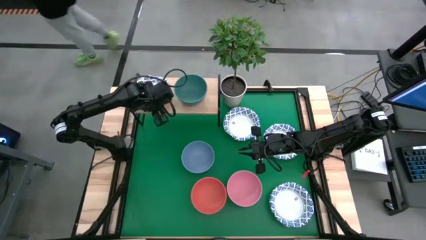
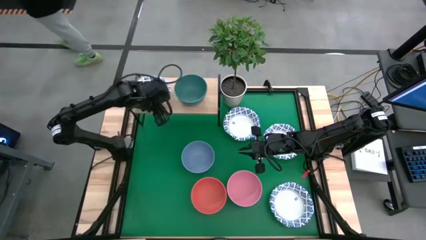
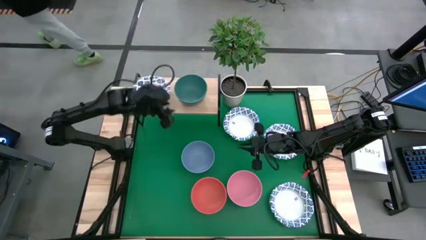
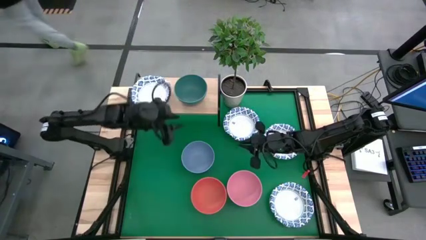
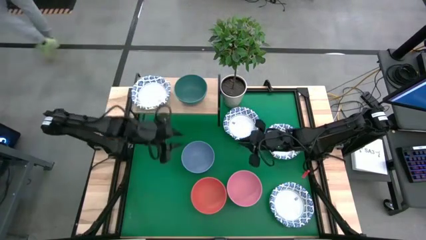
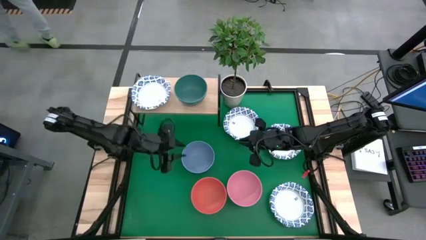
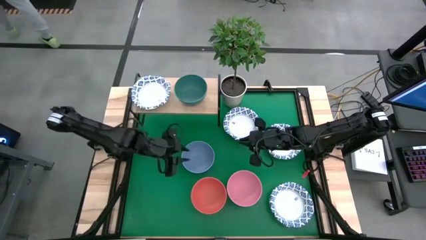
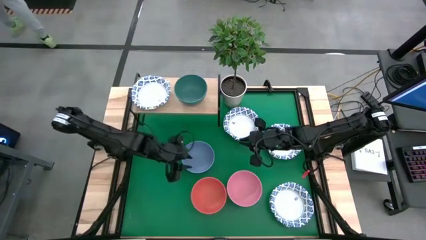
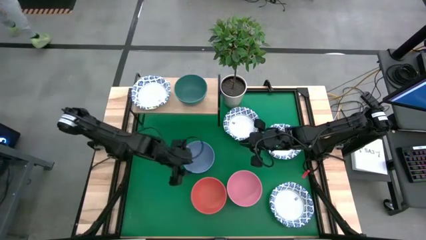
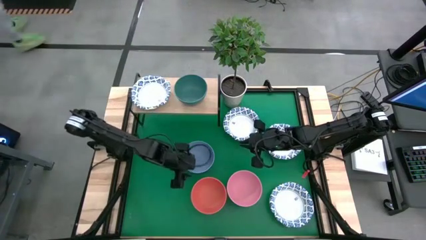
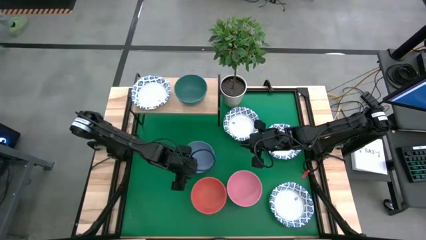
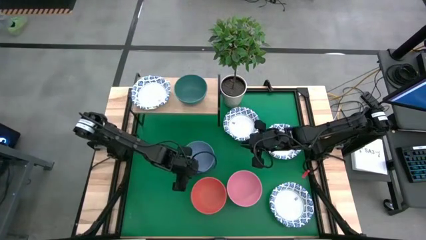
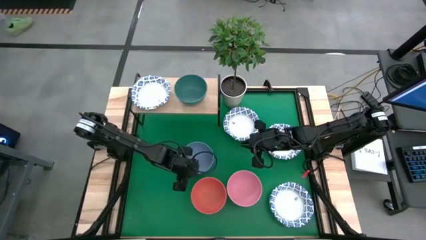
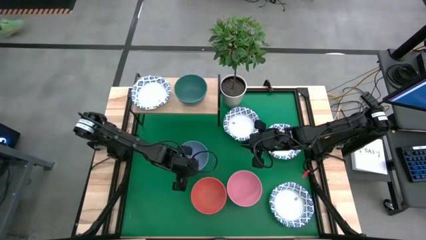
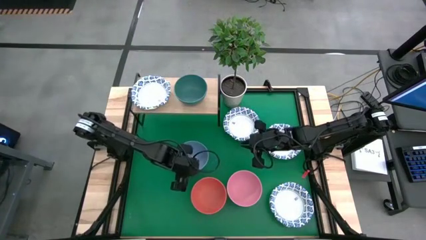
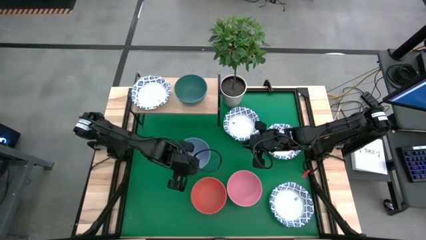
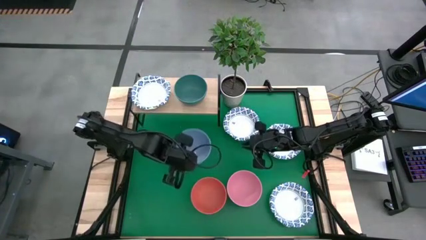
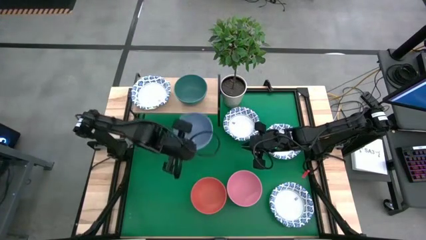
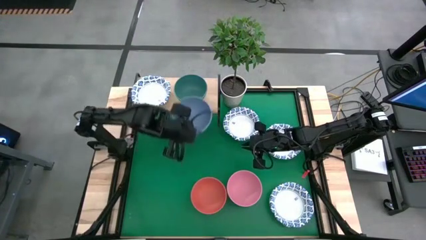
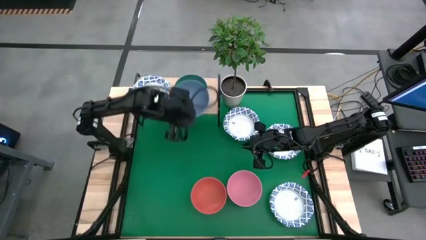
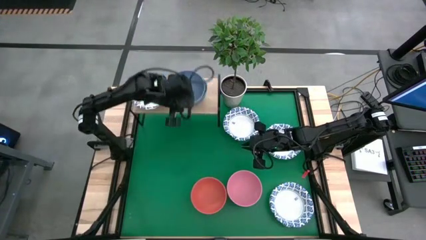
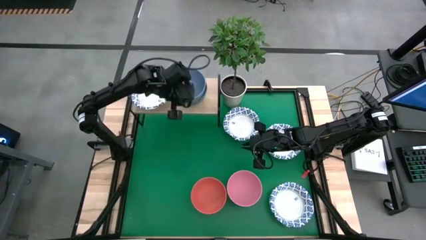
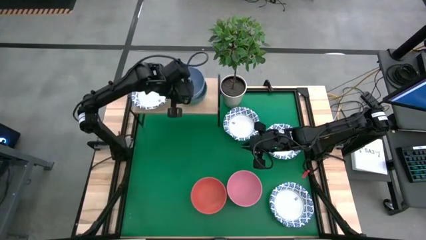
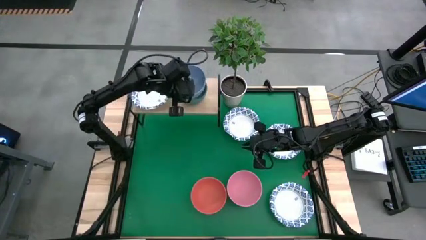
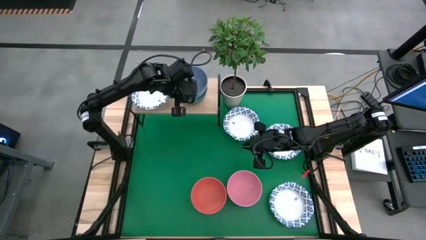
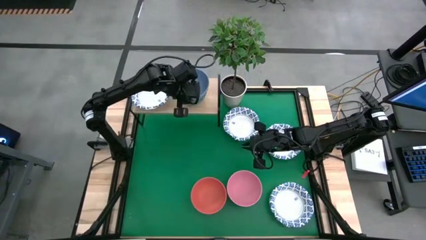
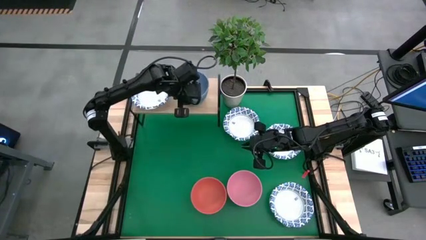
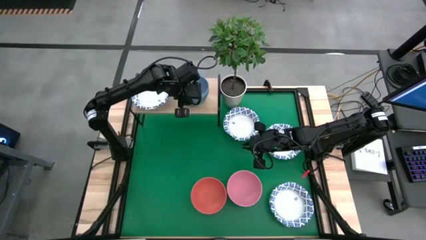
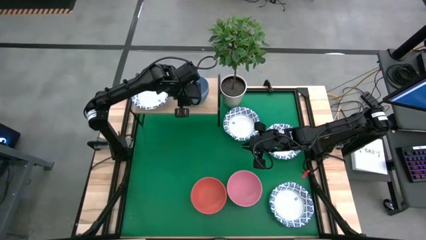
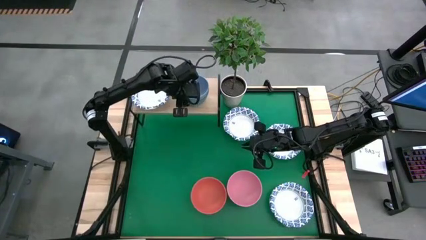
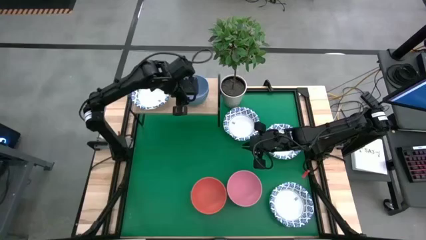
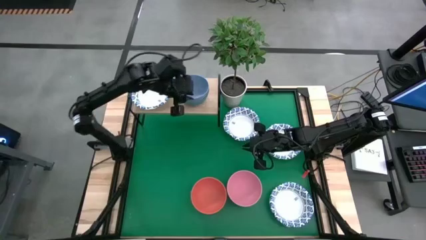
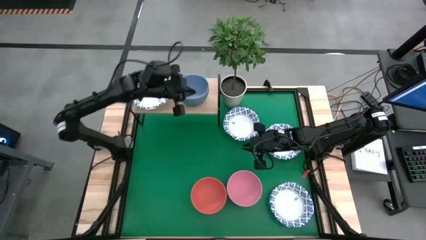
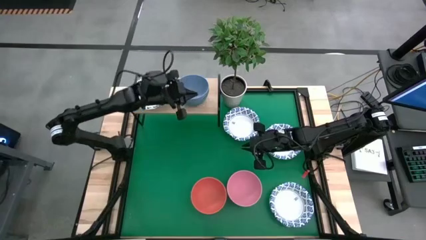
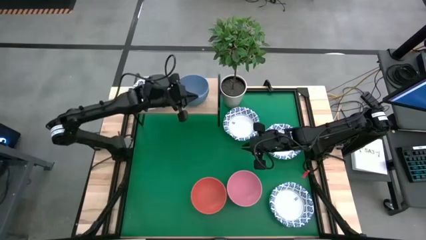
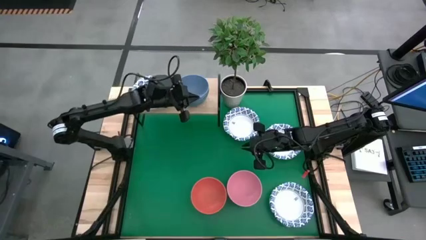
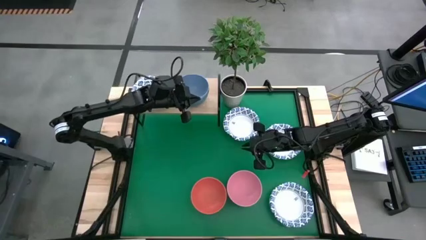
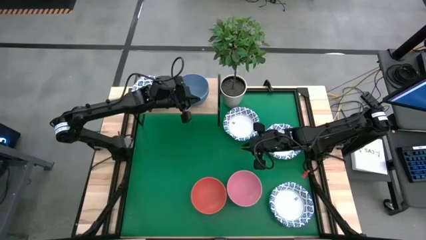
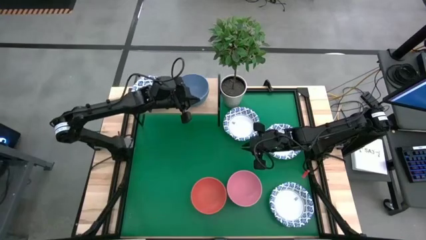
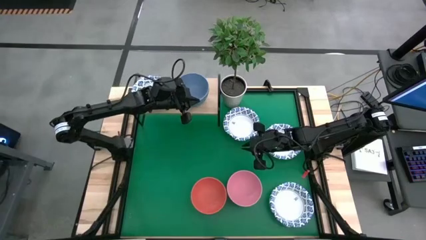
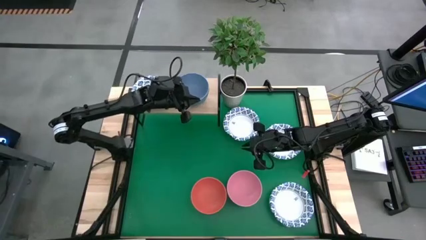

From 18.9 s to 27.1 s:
Task: Place and stack bowls onto a shelf
Stack the blue bowl on top of the green bowl on the shelf

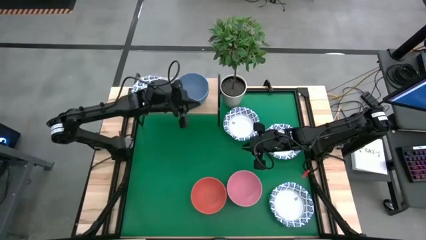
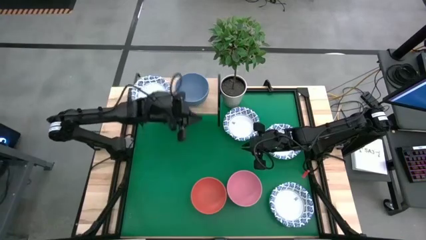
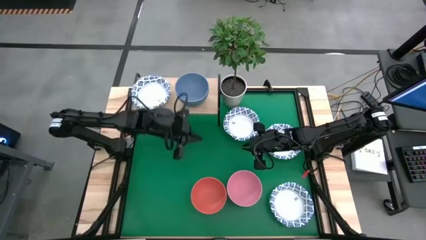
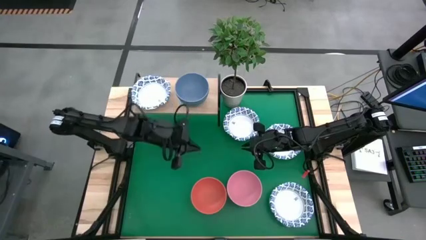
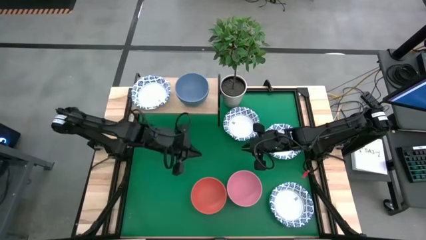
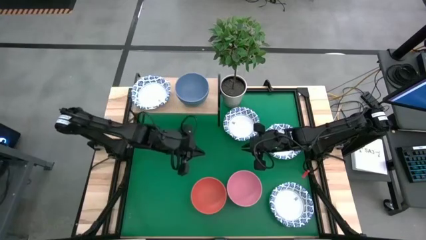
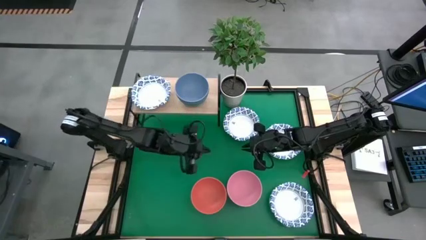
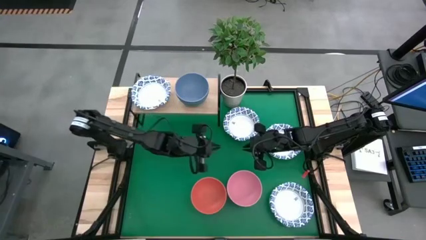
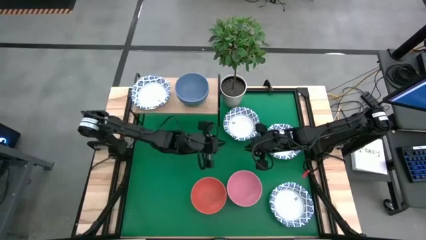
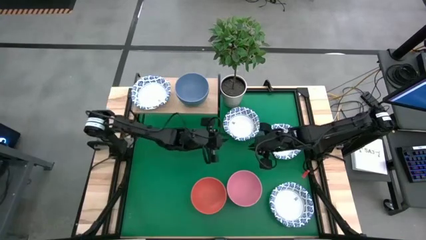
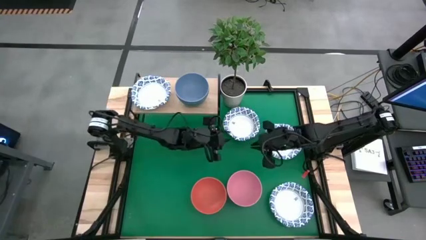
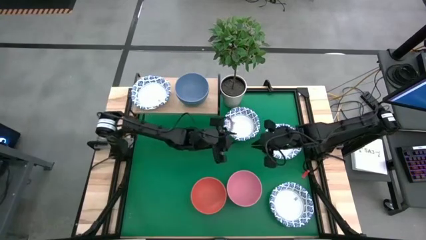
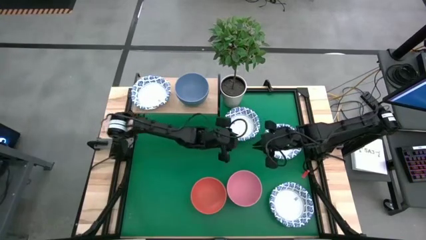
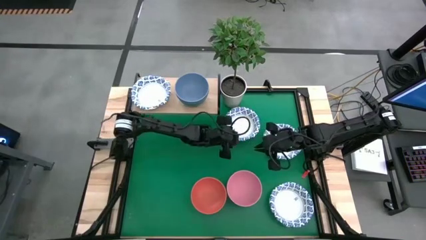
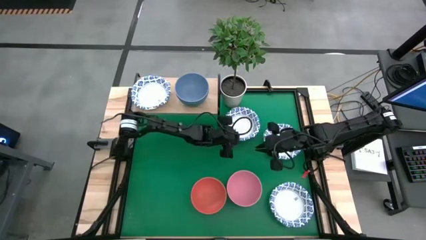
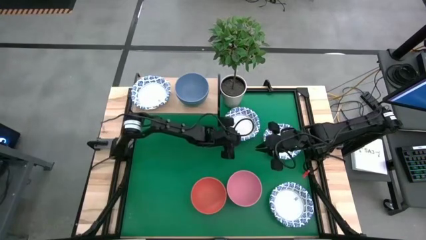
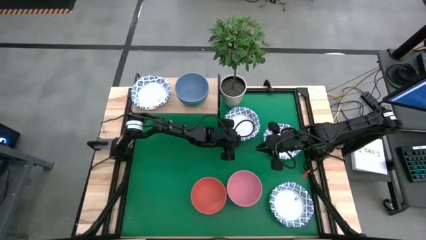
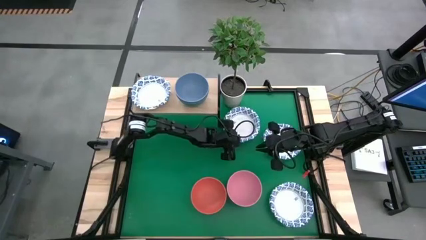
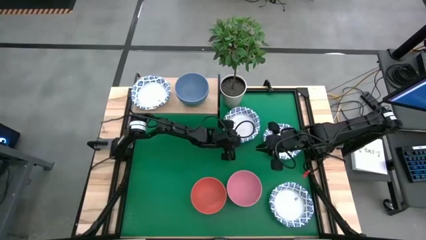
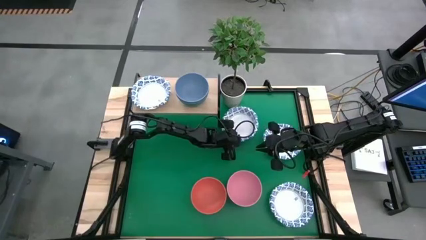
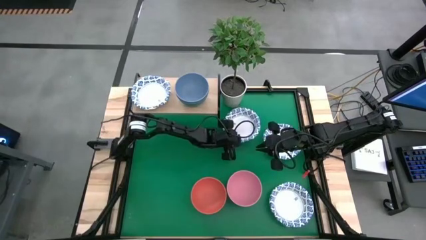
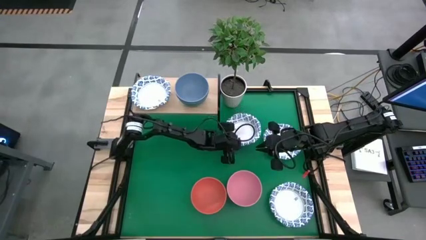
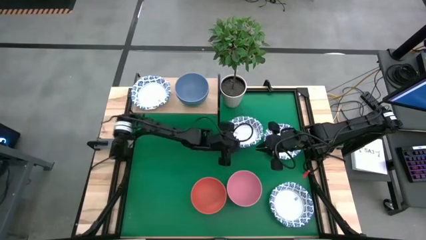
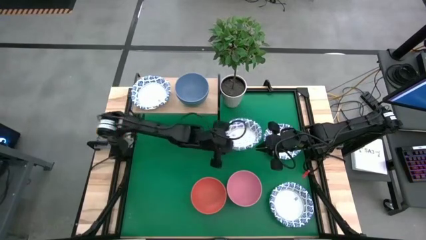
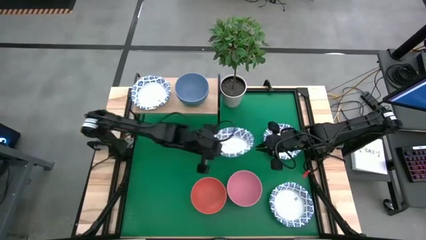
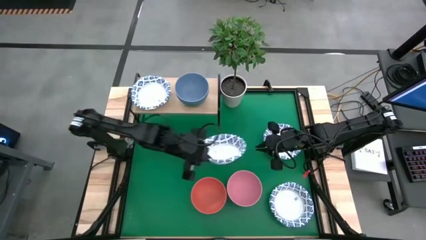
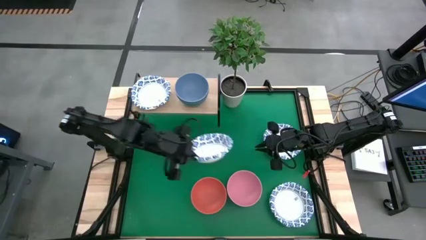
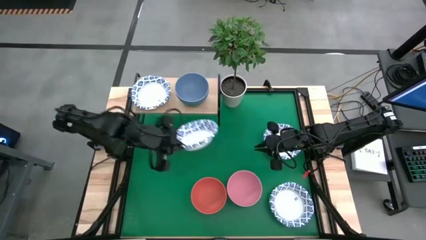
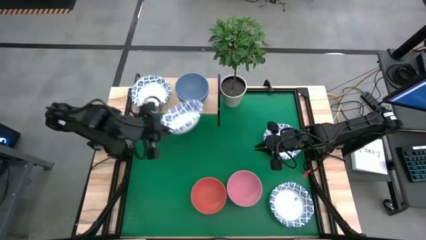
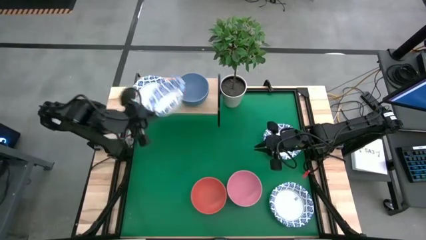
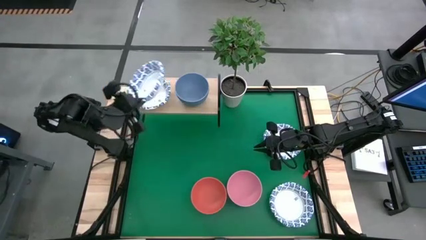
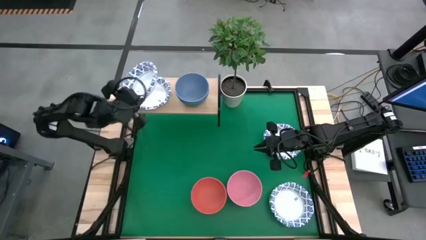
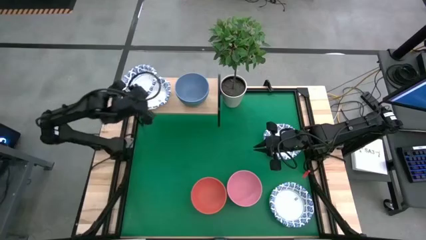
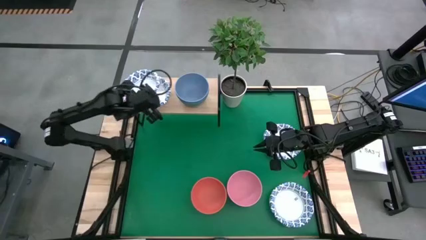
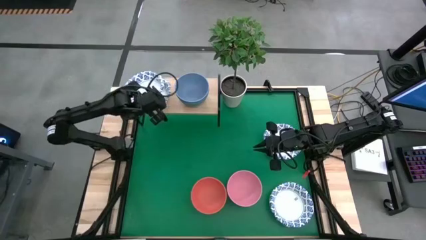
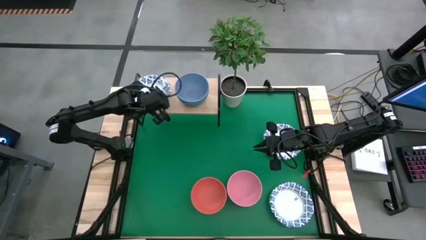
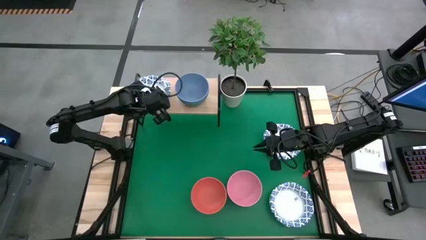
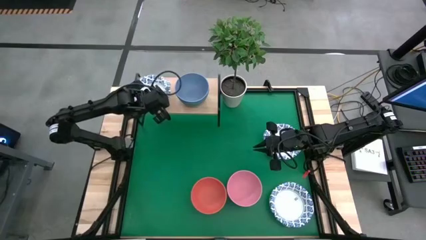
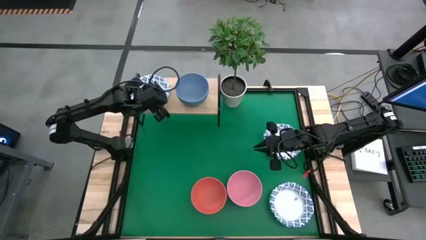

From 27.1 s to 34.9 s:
Stack the white patterned bowl on top of the white patterned bowl on the shelf
